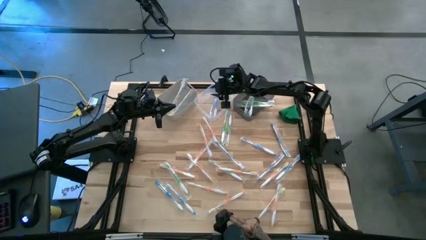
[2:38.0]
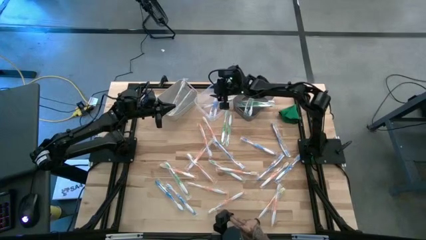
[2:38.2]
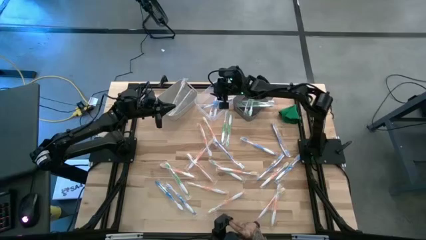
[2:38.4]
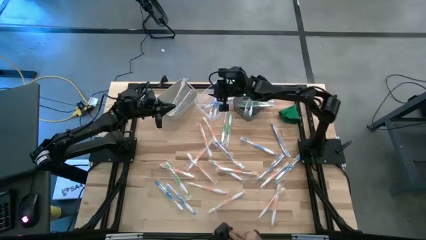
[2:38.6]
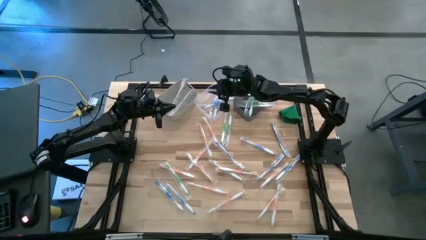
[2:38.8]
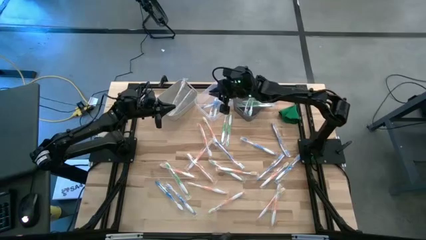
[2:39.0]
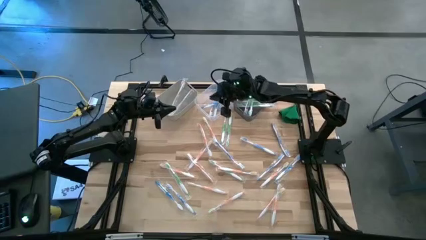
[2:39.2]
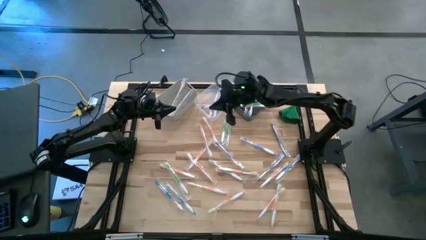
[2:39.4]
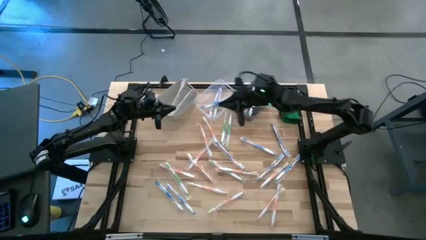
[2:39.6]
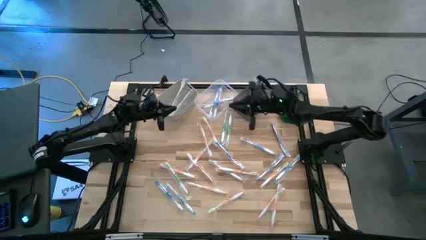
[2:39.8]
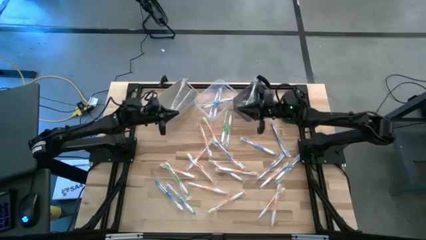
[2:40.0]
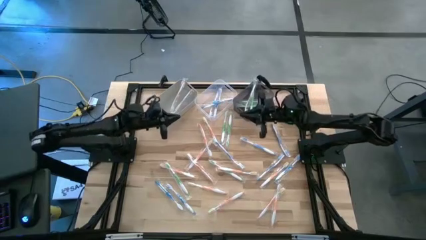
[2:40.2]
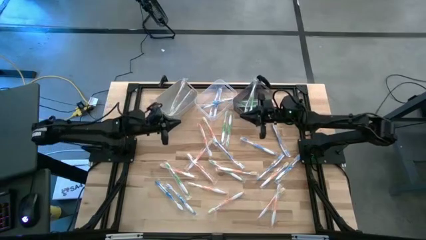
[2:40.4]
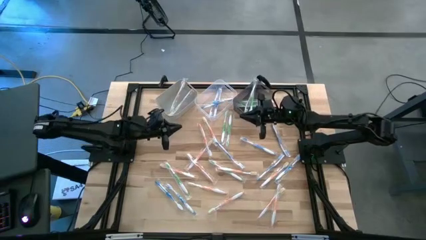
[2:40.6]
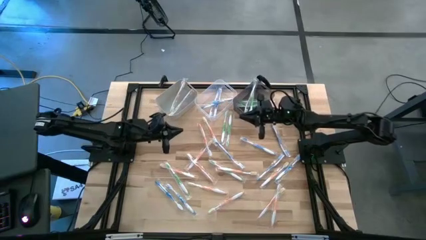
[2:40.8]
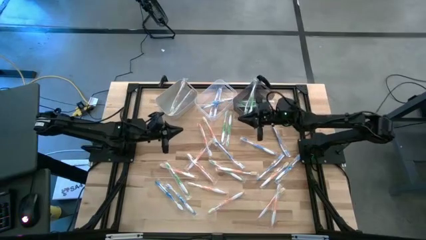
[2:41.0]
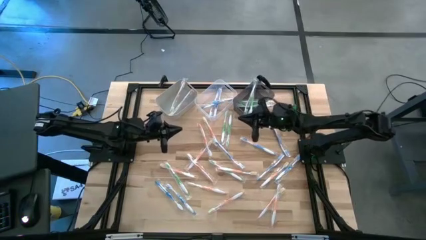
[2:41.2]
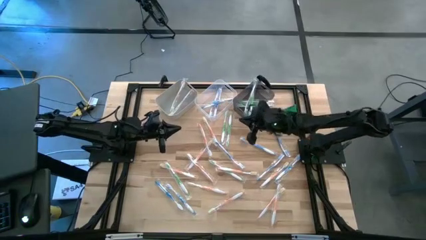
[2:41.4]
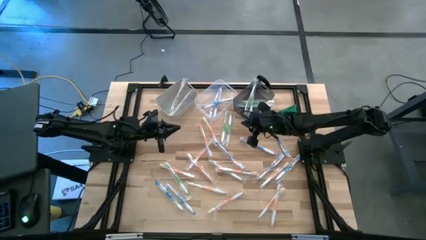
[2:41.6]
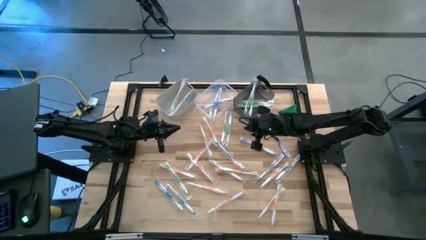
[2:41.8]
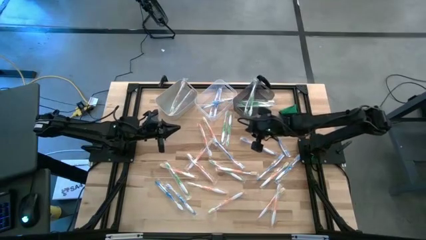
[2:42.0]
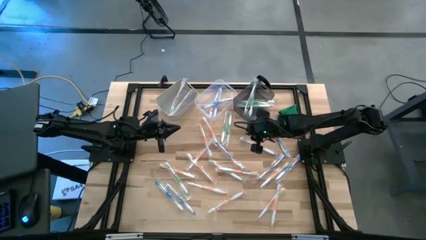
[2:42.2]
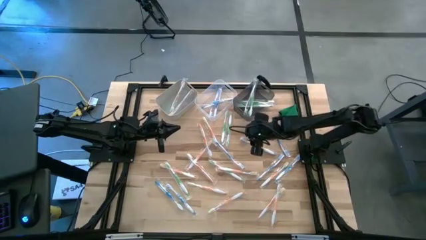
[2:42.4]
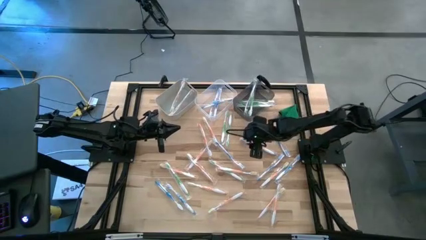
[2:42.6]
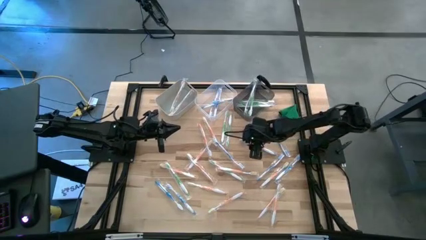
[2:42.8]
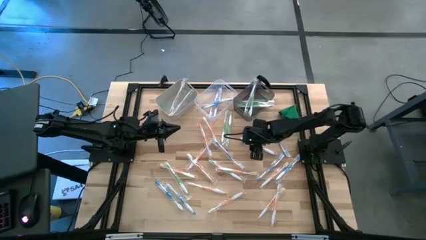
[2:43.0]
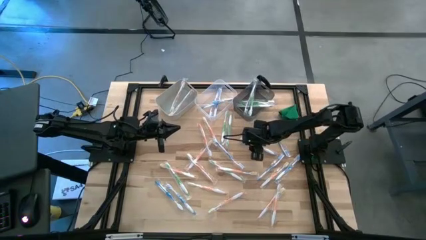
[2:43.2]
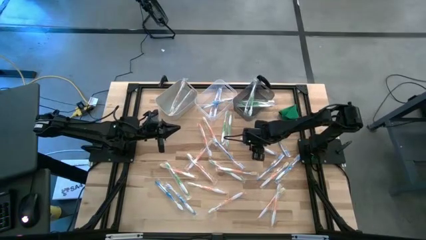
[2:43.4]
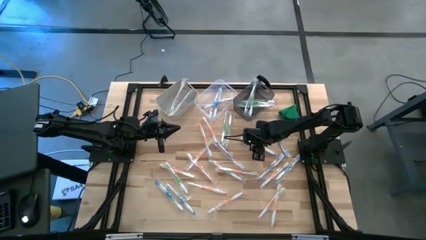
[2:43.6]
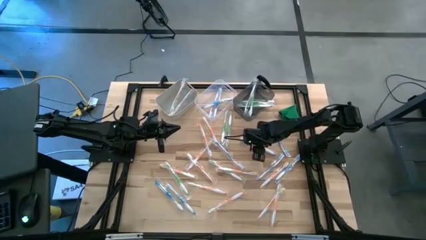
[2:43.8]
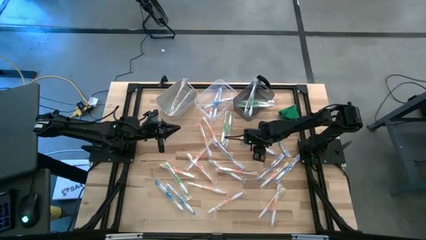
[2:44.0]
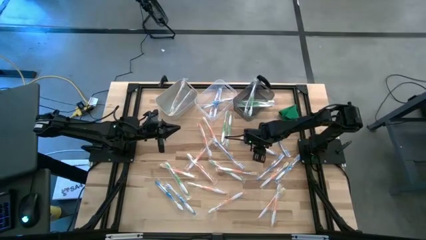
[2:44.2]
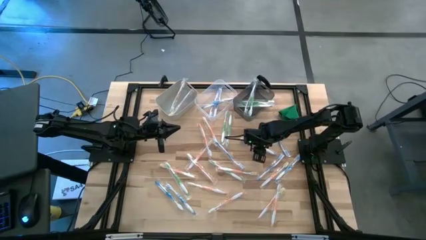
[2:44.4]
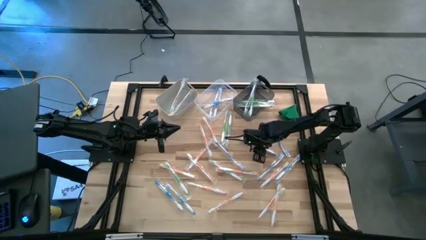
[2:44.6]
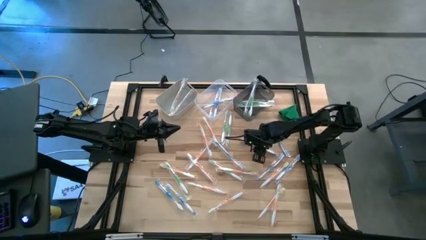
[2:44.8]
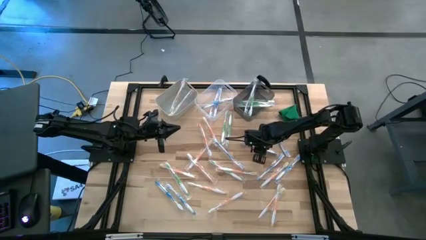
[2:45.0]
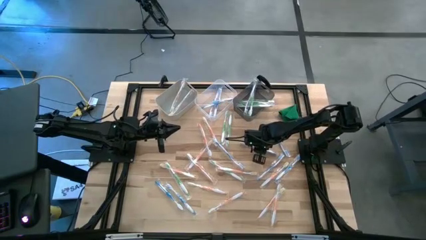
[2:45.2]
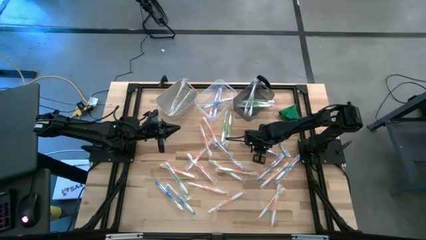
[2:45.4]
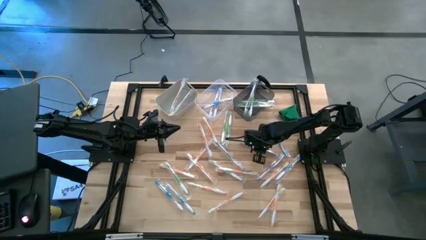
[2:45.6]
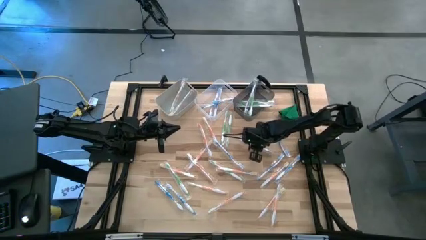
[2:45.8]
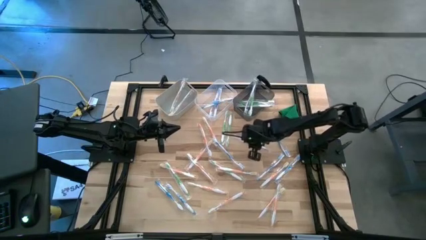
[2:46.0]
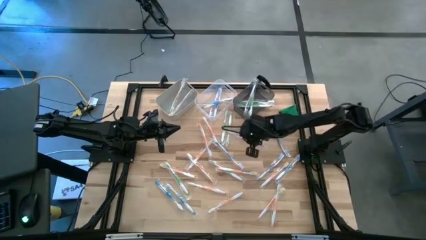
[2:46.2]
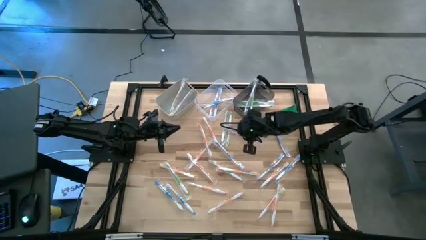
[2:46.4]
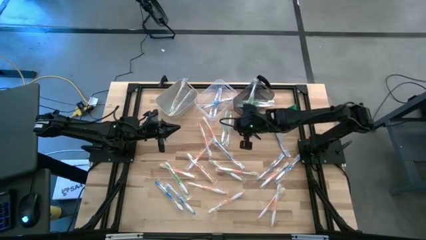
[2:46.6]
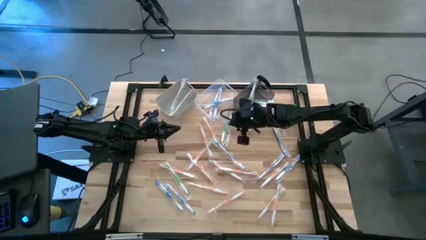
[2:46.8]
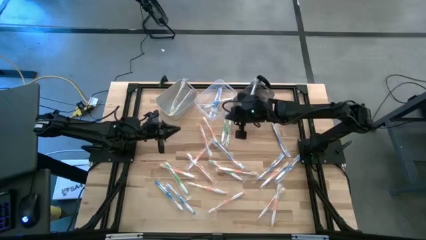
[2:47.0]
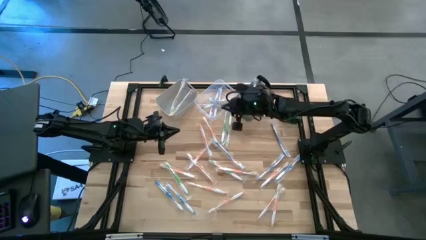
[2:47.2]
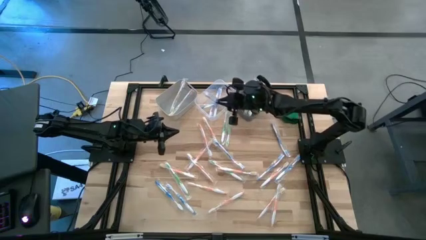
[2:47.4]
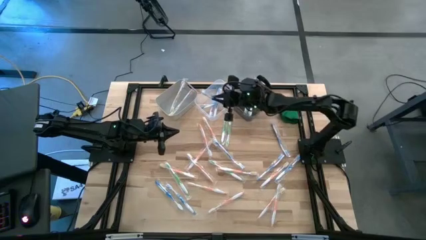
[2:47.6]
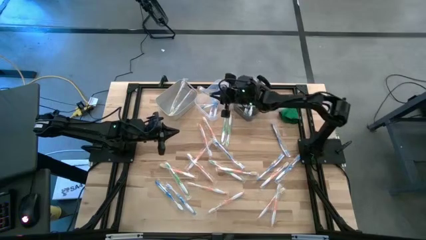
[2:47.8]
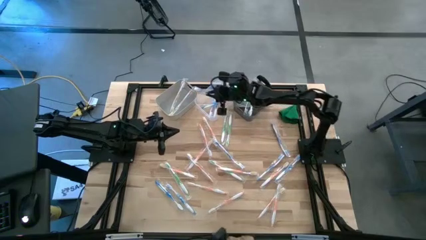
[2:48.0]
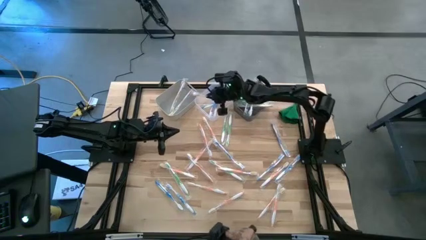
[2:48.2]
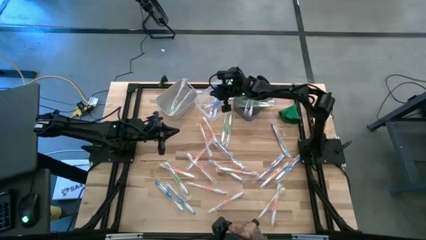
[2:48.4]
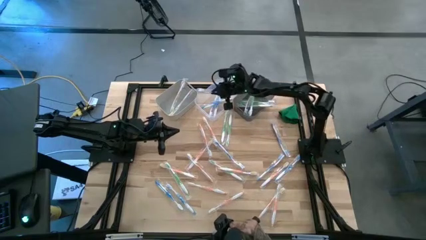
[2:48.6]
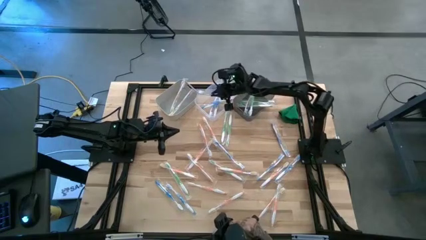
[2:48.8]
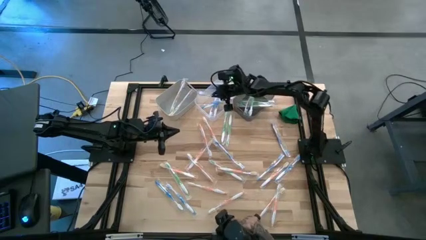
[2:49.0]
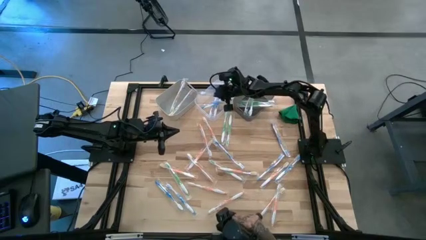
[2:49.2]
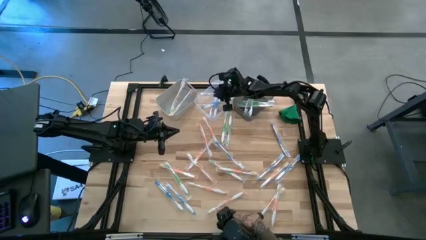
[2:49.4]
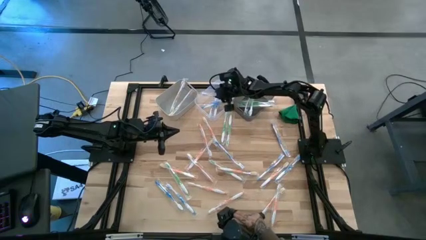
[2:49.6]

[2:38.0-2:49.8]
Task: Pick & Place Toothbrushes
Put the blue toothbrush into the transparent bin

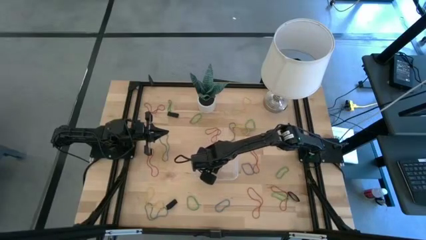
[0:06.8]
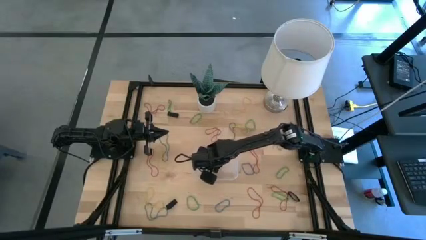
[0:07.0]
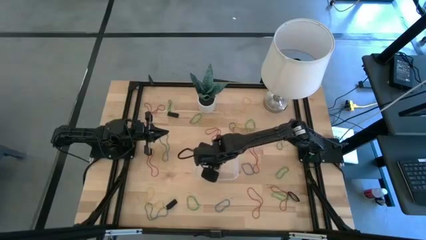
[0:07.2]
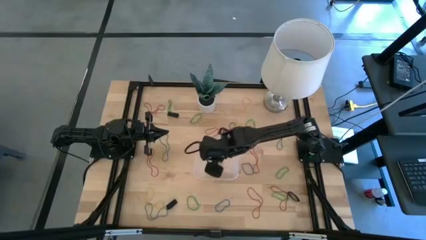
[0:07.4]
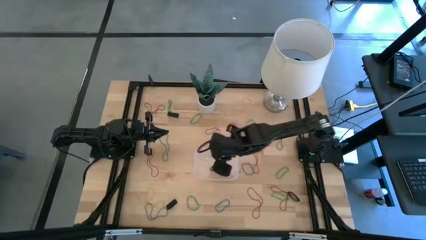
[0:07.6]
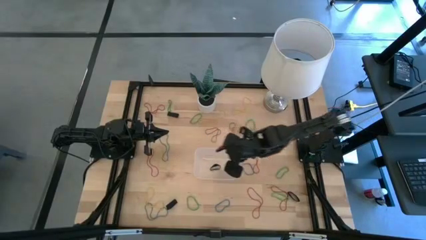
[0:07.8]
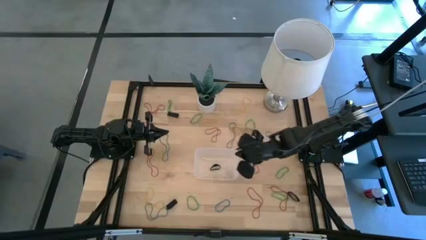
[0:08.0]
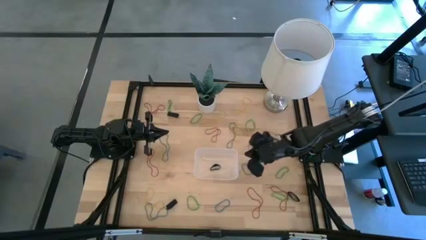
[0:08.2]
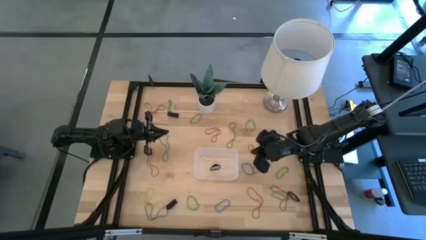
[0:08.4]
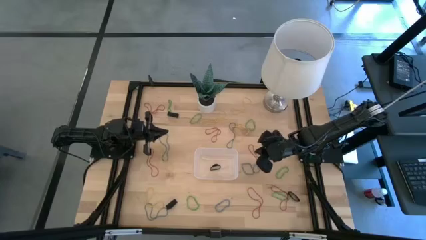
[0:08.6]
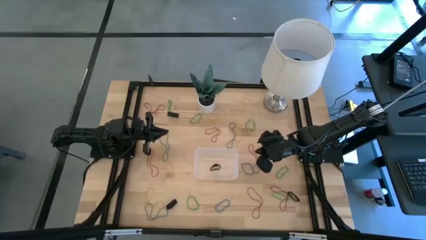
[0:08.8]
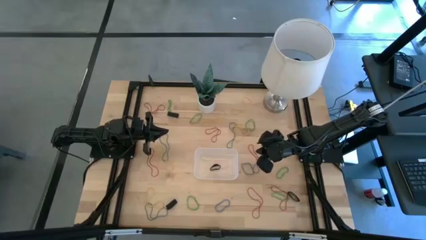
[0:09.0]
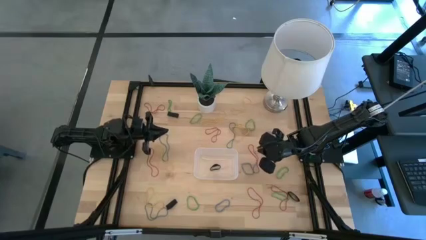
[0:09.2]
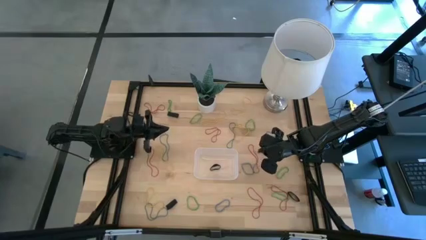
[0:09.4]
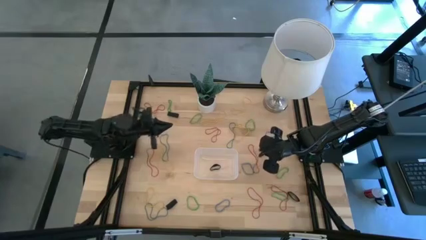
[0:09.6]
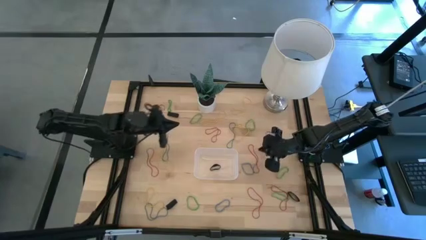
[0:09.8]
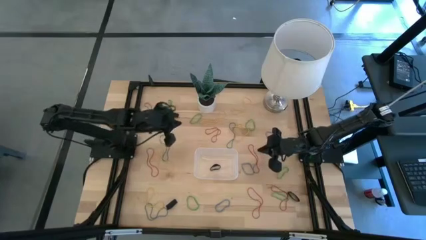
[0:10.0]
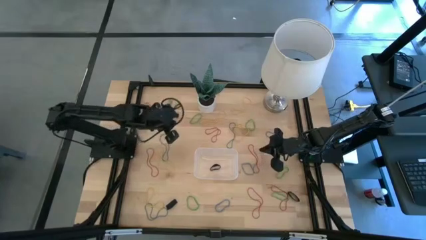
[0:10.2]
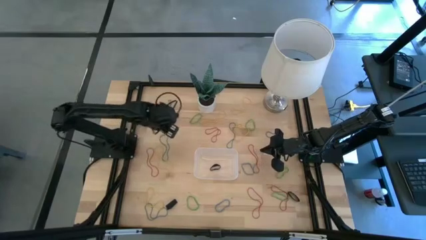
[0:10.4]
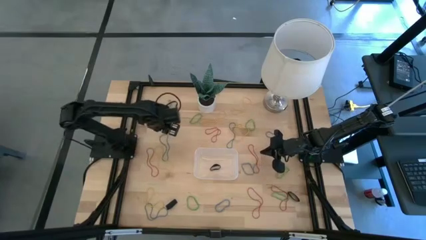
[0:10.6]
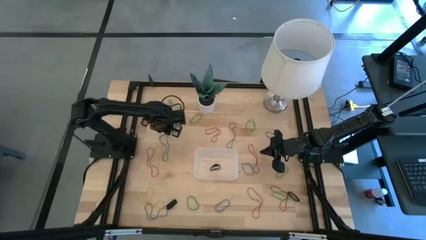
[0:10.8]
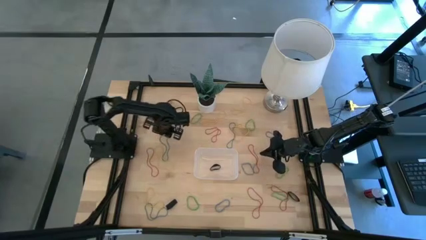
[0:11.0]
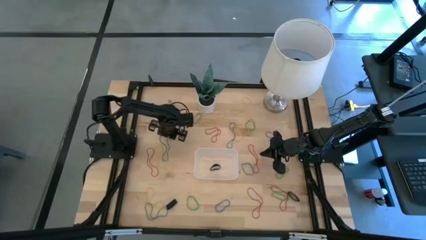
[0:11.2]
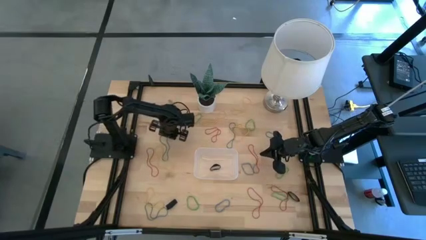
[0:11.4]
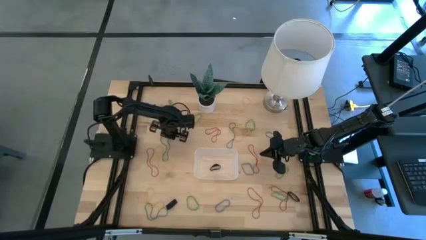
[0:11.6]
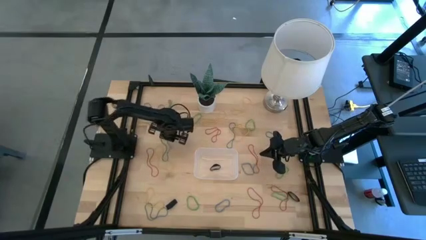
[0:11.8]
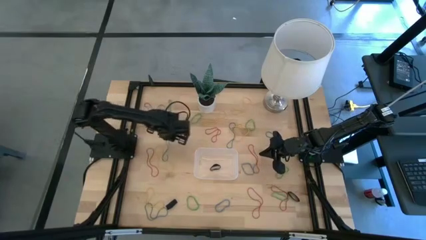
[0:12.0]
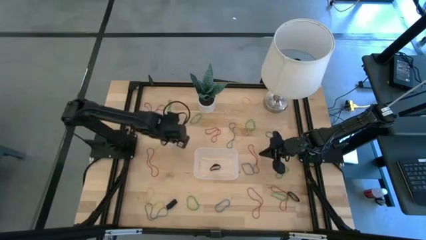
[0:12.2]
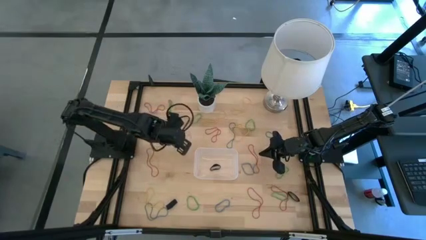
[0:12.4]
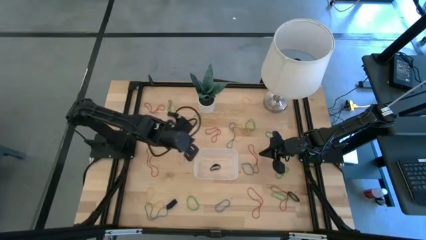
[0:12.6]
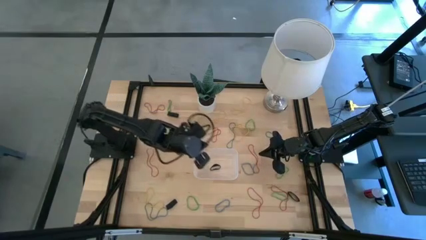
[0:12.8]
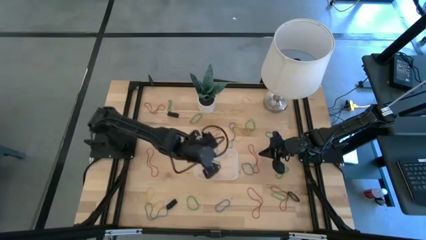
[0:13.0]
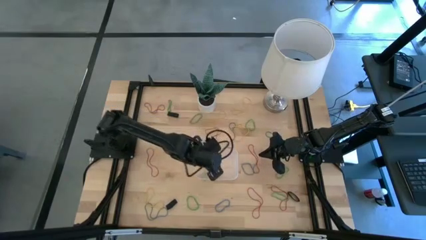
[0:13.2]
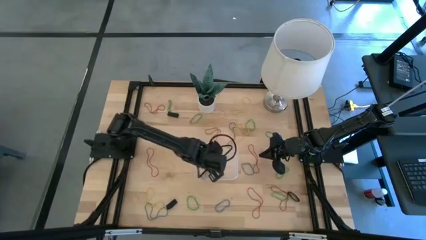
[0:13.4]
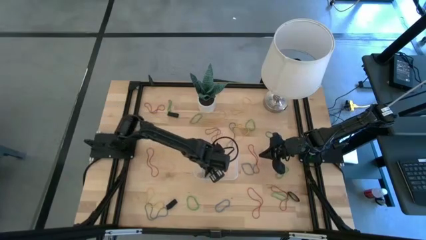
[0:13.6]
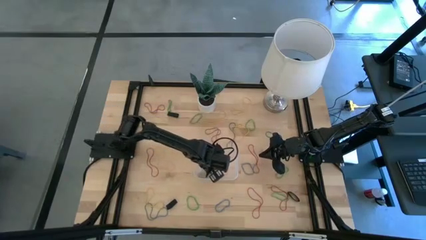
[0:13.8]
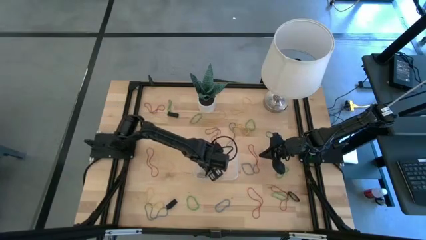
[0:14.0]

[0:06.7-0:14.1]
Task: Pick and place rubber bands into bin
Put the blue rubber band into the transparent bin
